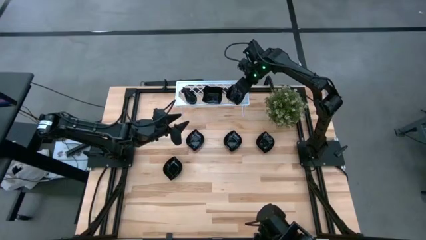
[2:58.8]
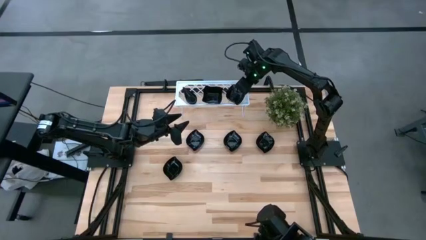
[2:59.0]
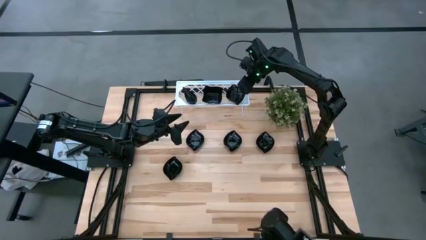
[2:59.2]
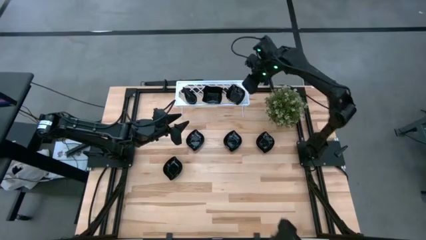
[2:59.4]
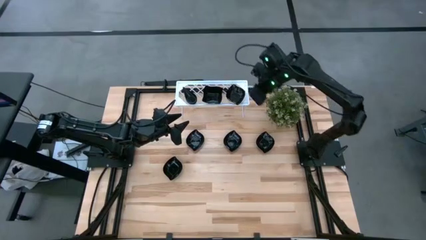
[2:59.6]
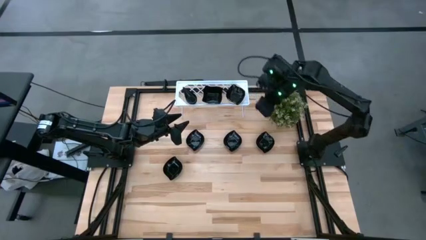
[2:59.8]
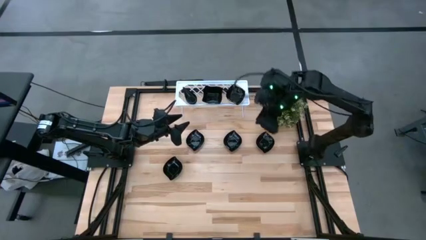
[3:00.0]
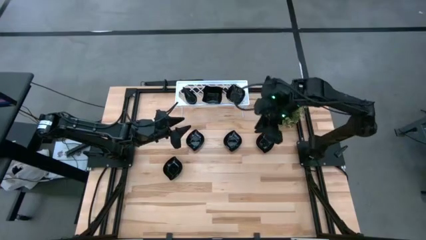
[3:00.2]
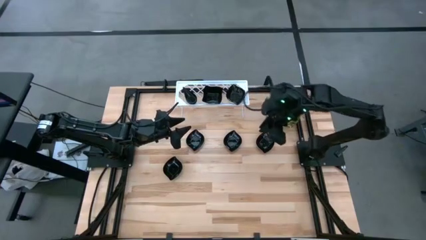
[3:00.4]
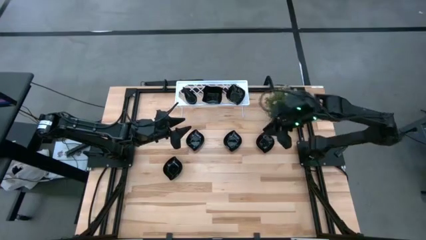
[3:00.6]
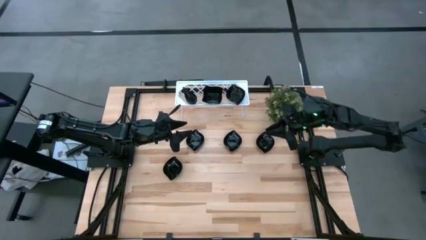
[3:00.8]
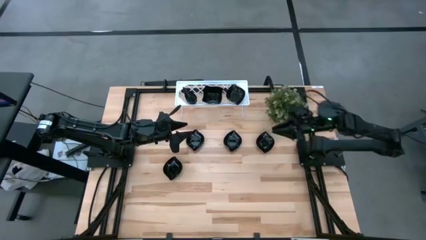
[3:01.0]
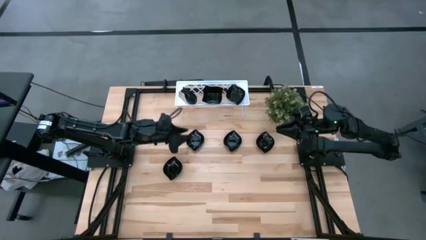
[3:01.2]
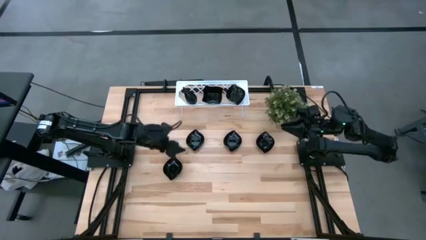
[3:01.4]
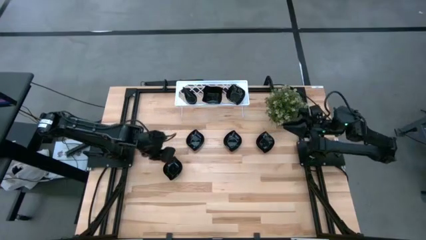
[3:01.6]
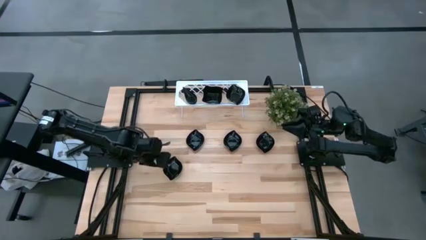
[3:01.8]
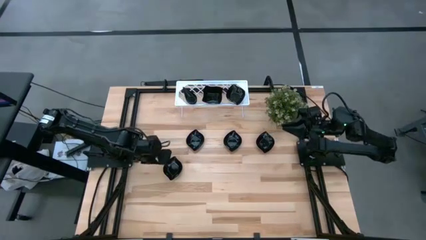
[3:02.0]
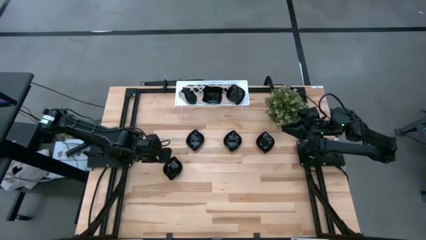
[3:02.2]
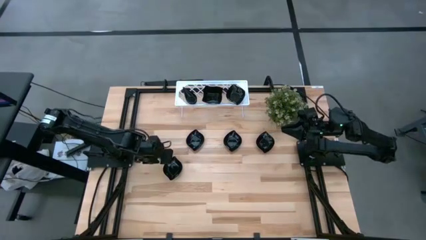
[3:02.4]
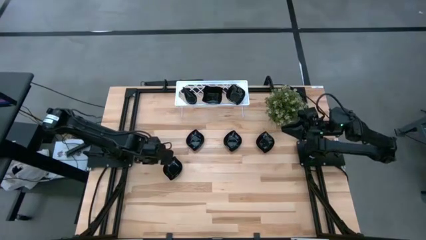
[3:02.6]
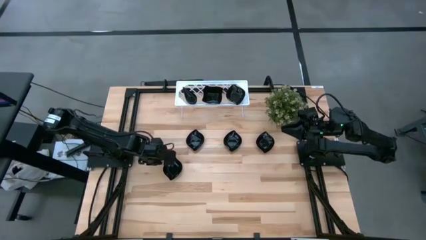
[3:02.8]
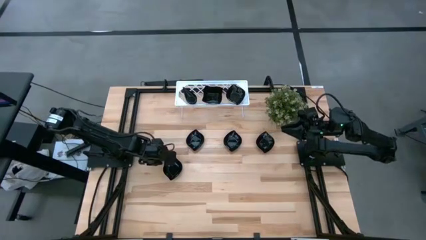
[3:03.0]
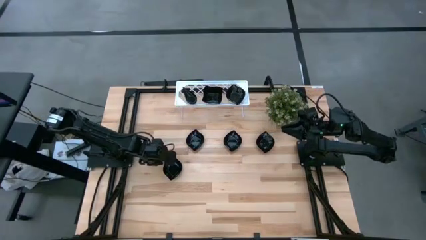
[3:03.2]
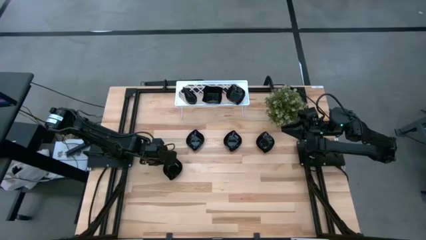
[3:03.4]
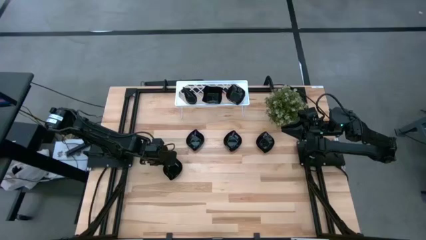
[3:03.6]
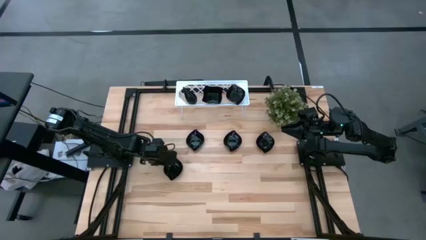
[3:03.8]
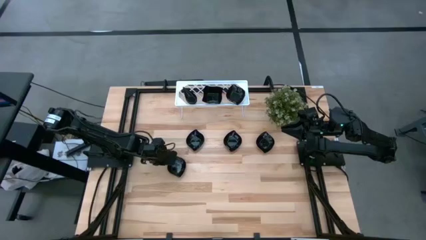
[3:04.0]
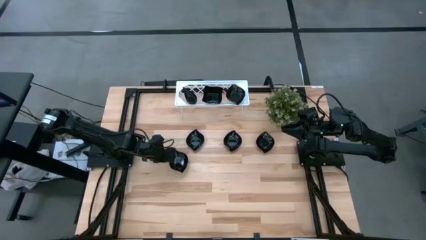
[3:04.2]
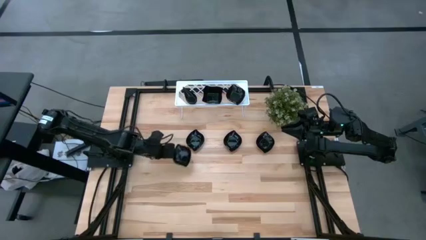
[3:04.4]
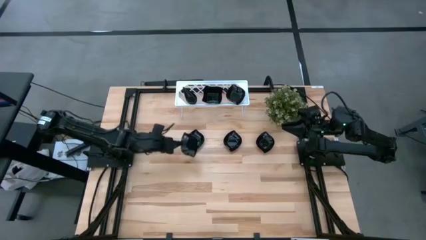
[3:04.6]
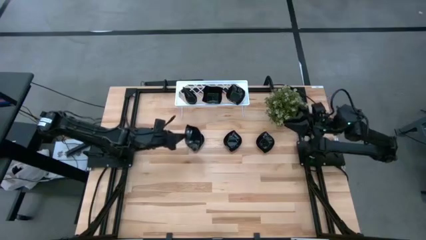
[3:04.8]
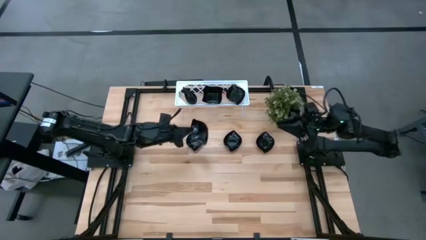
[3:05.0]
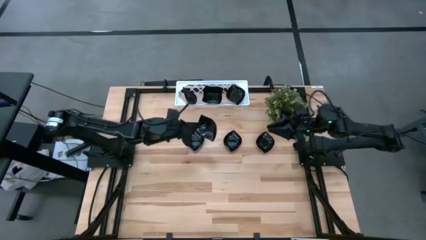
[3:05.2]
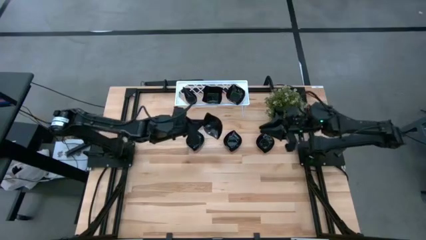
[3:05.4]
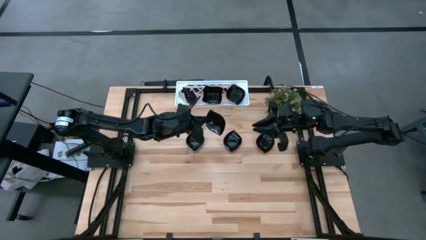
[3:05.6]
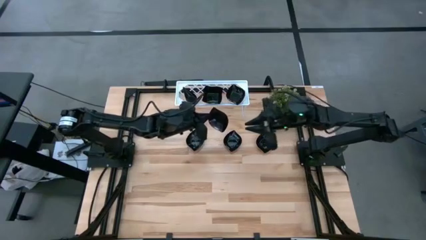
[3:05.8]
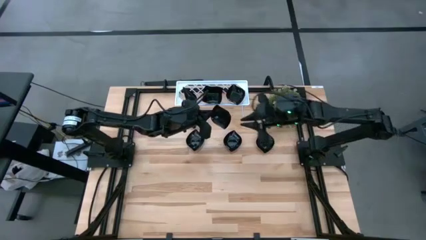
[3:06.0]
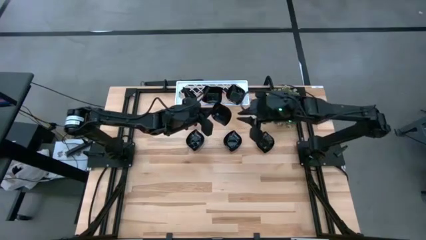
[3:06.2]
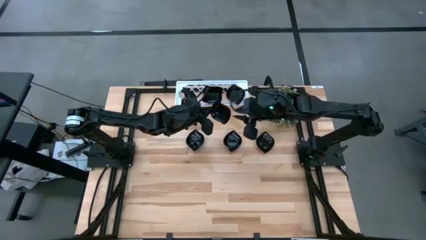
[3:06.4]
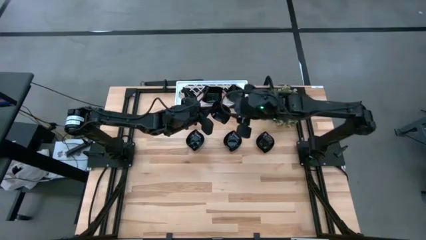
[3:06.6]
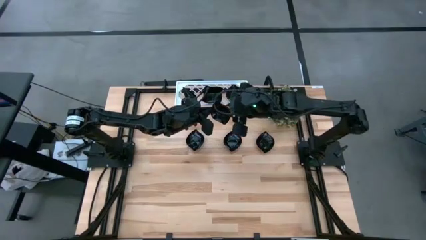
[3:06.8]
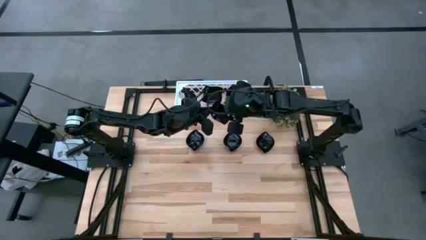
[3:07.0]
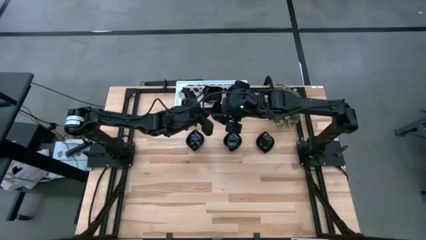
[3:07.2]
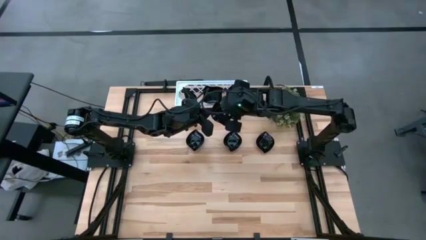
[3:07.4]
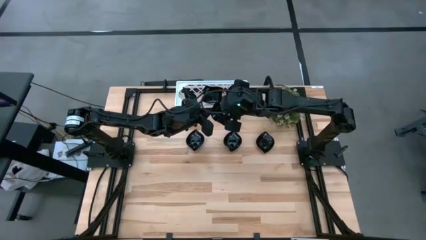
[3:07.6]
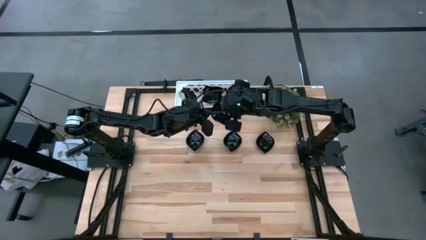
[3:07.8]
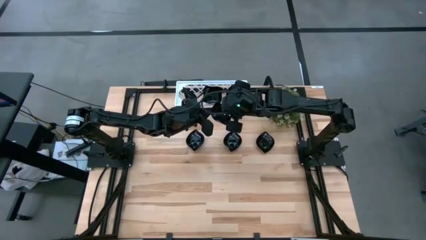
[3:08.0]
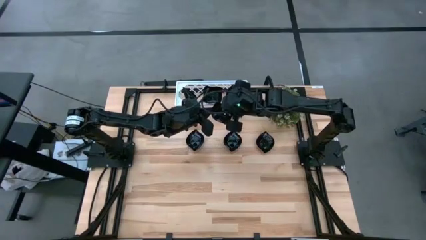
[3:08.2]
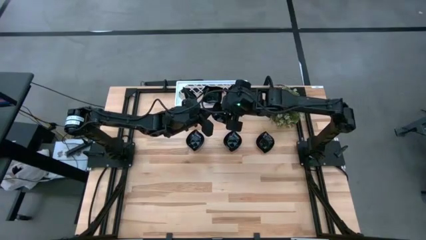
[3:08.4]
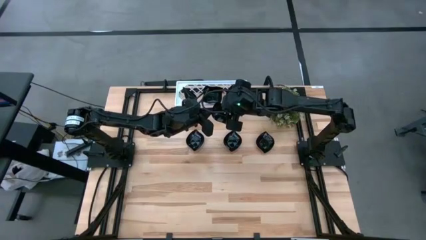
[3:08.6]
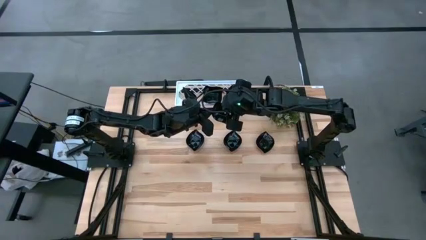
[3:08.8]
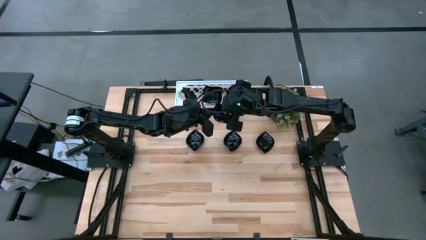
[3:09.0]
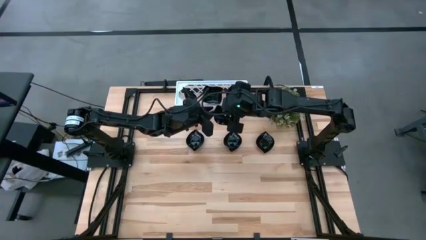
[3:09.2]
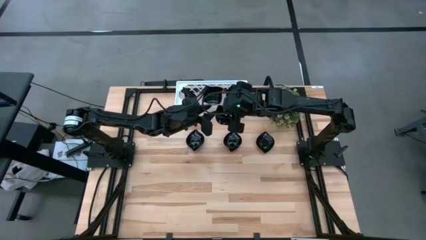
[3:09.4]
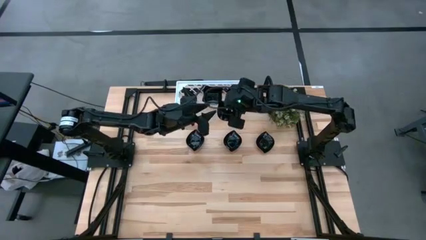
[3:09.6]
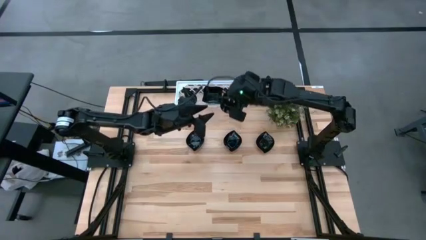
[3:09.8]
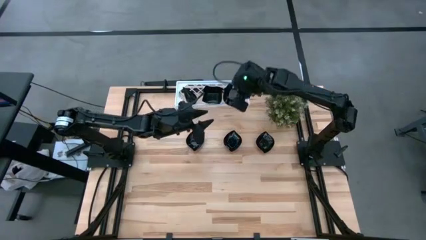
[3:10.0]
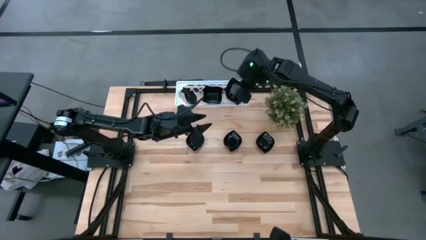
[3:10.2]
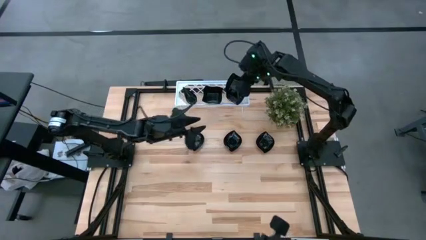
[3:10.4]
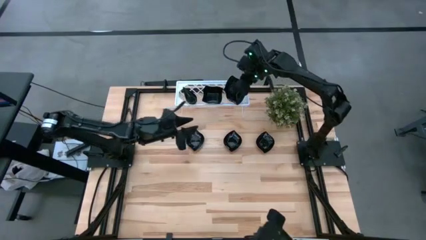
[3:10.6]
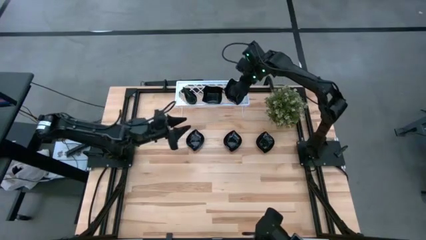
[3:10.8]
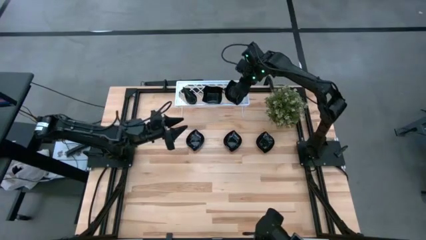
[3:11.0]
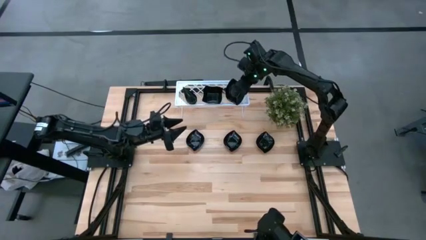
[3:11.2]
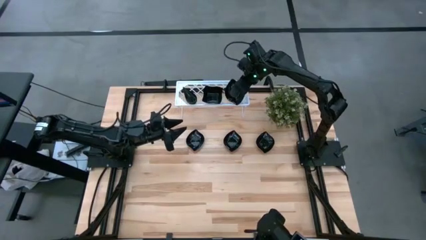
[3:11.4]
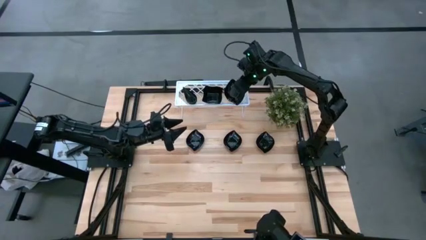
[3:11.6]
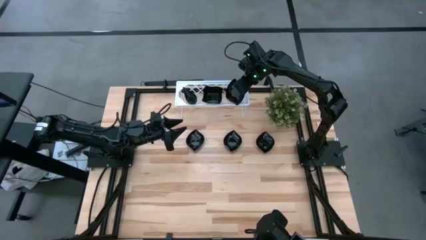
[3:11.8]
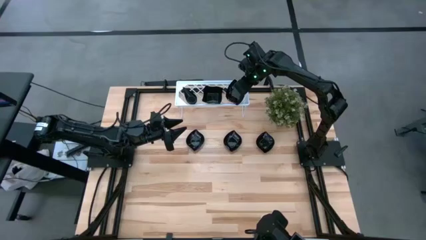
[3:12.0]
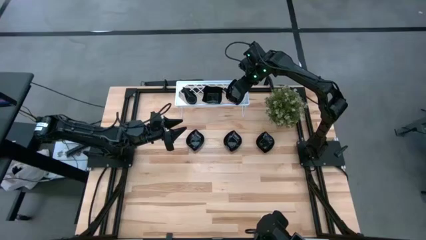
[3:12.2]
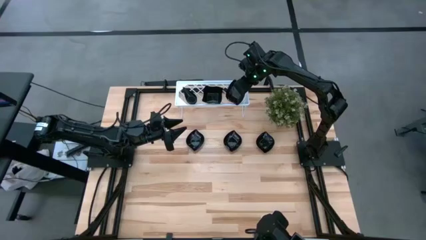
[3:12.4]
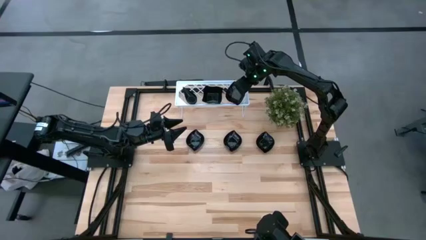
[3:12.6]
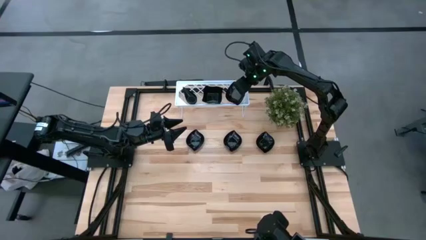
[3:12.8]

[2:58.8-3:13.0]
Task: Pick & Place Mini shaped plates
Stack the leaf shaped plate on top of the leaf shaped plate on the shelf

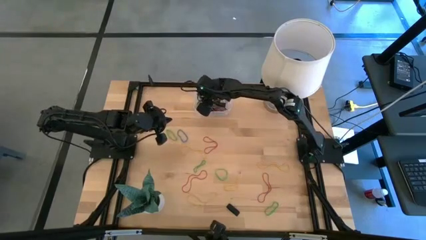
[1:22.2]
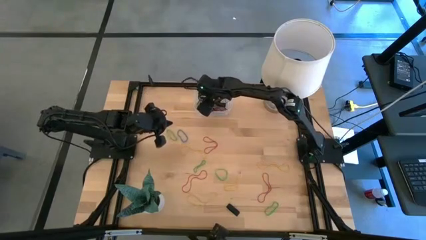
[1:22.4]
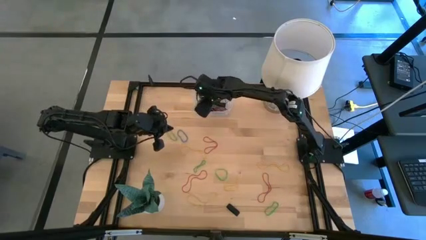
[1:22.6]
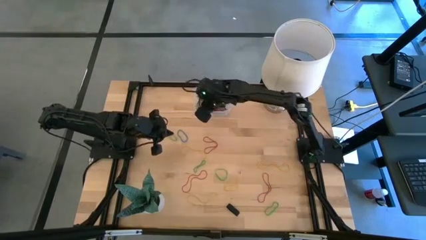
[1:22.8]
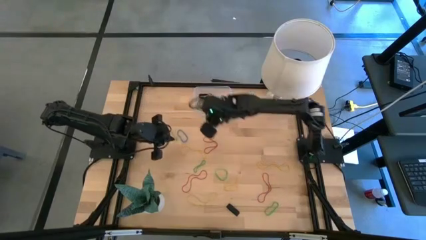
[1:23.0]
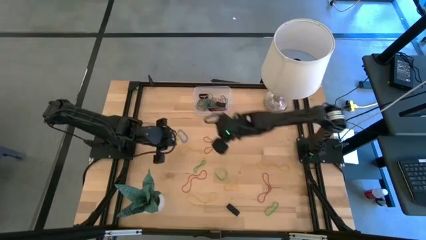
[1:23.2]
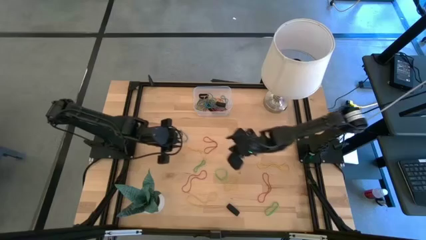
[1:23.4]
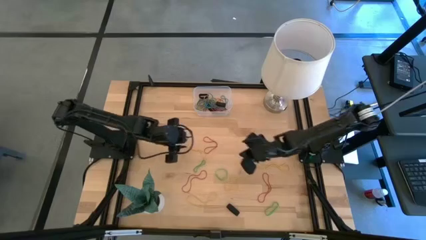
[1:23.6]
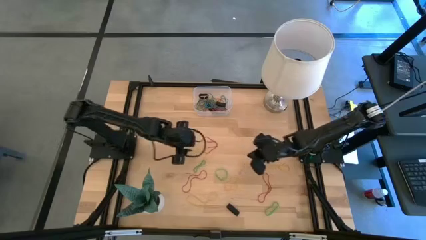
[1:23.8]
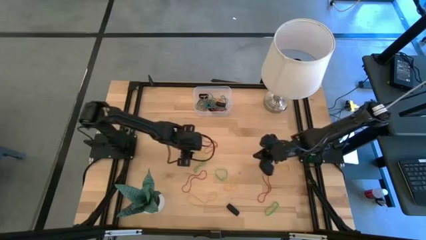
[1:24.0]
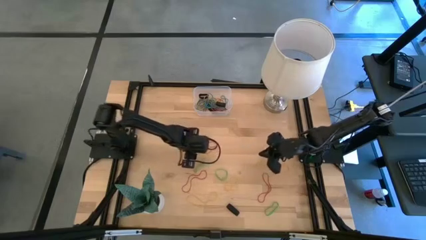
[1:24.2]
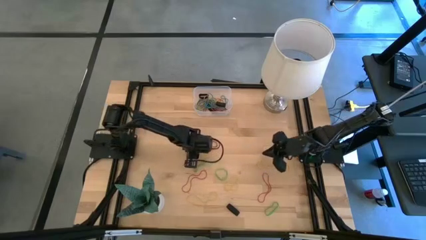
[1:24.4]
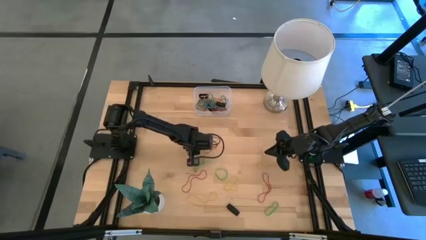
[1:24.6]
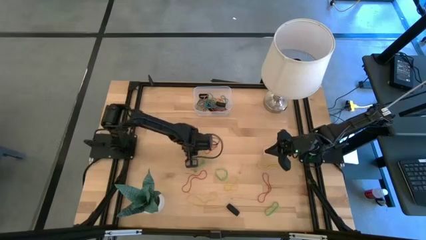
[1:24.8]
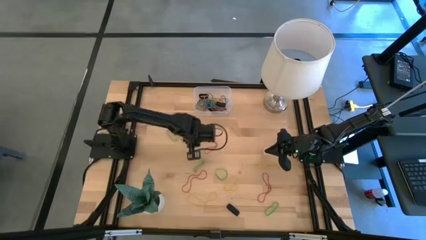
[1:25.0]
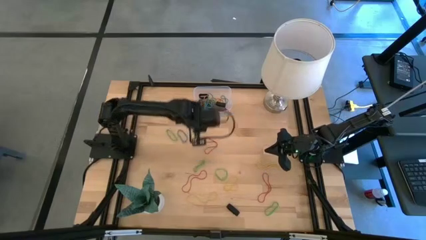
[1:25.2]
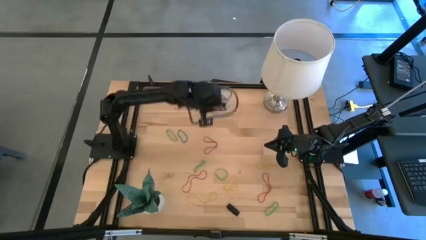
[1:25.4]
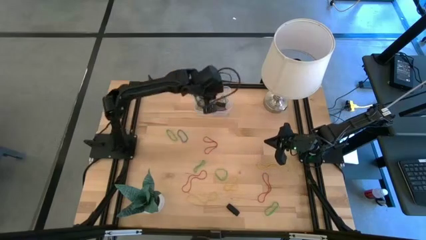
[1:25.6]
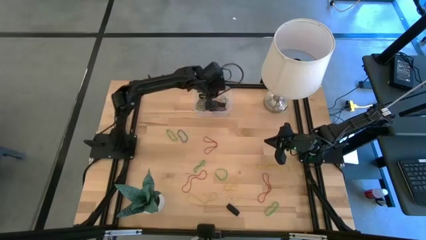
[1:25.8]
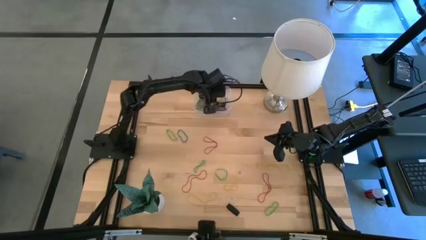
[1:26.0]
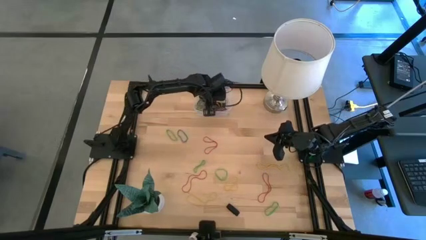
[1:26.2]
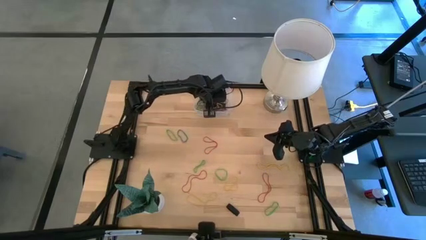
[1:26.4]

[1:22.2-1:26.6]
Task: Pick and place rubber bands into bin
Put the yellow rubber band into the transparent bin
